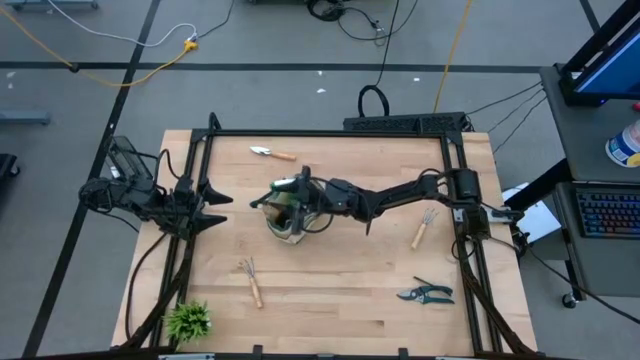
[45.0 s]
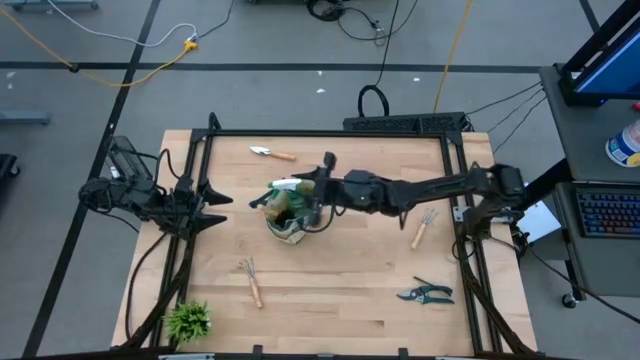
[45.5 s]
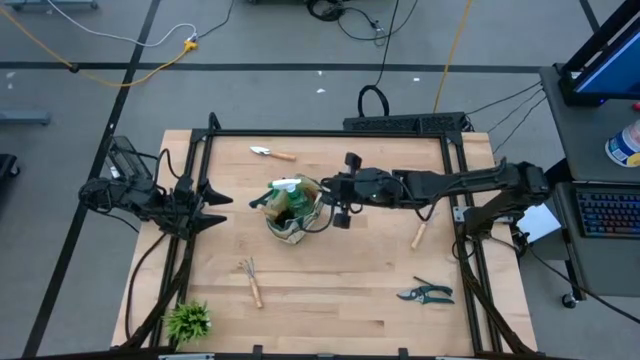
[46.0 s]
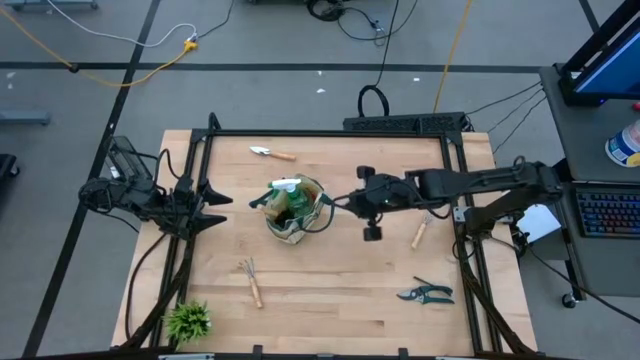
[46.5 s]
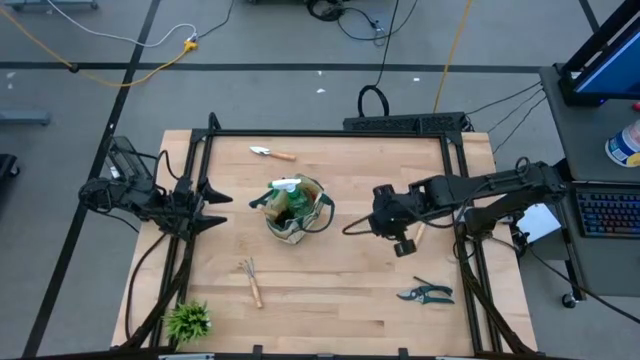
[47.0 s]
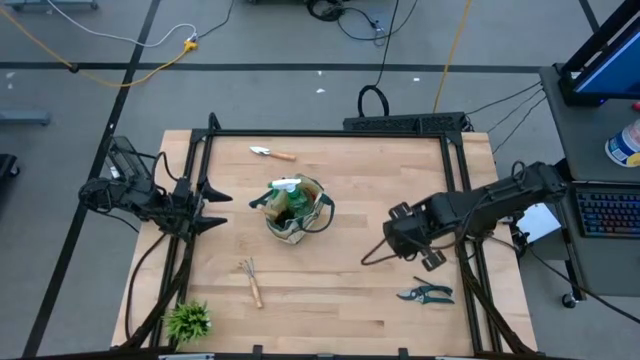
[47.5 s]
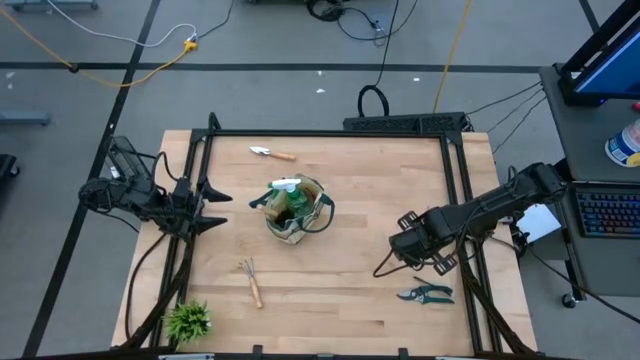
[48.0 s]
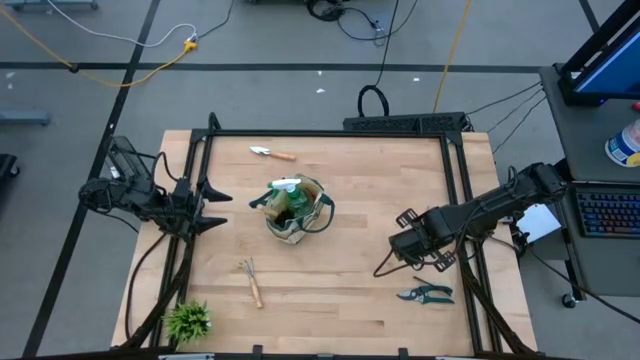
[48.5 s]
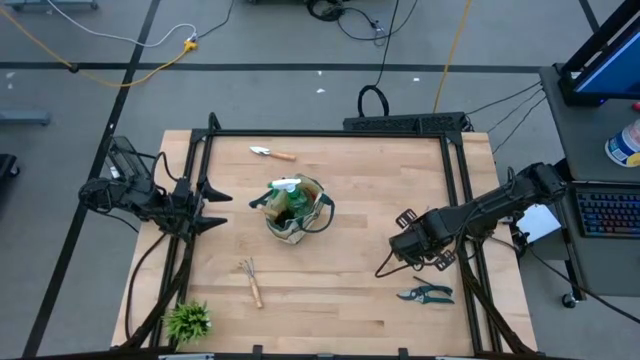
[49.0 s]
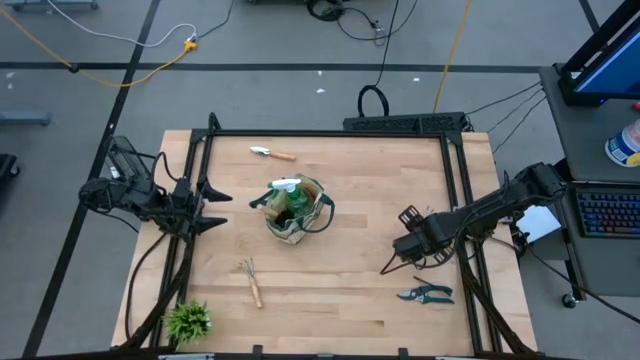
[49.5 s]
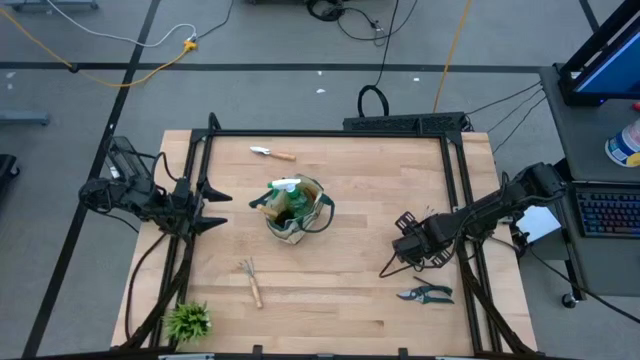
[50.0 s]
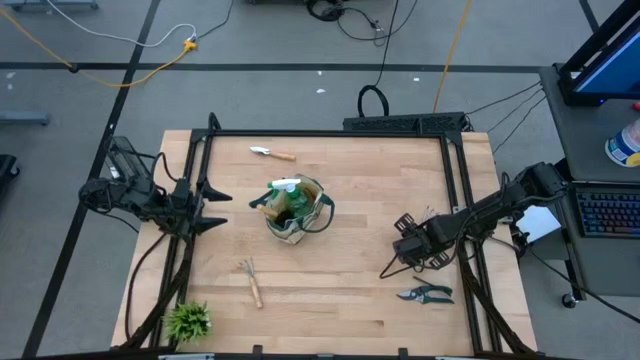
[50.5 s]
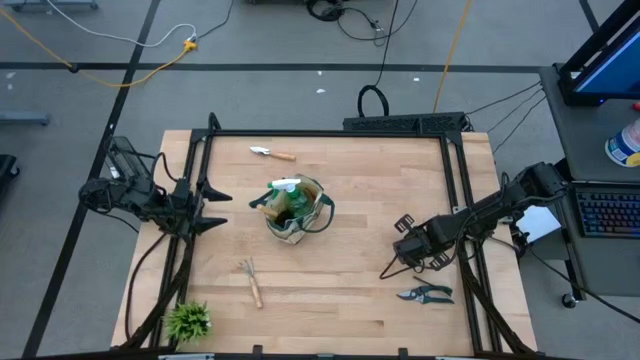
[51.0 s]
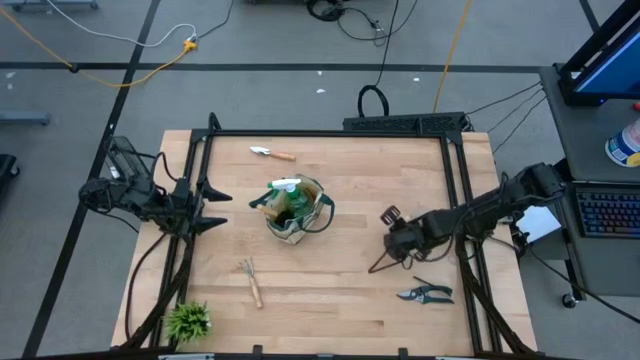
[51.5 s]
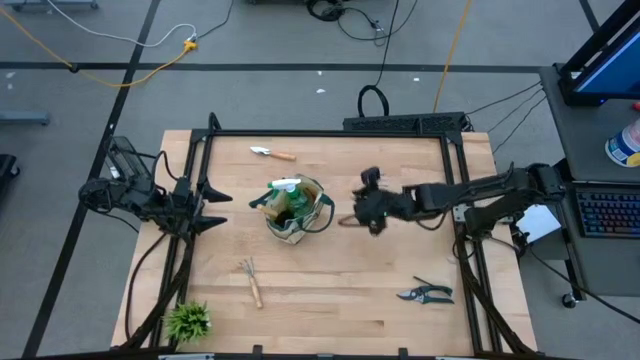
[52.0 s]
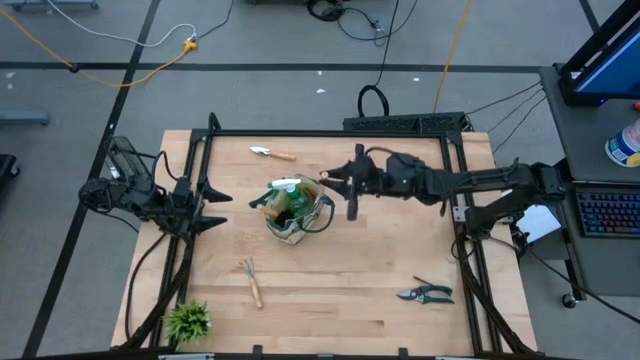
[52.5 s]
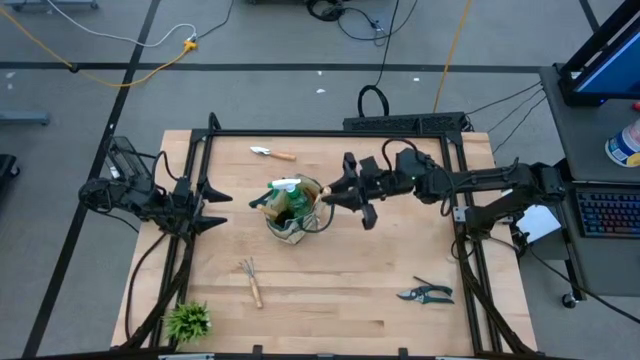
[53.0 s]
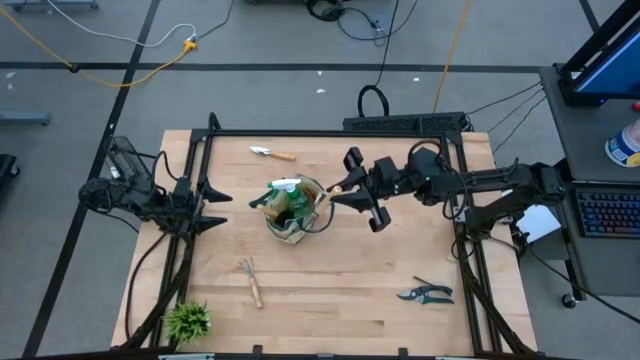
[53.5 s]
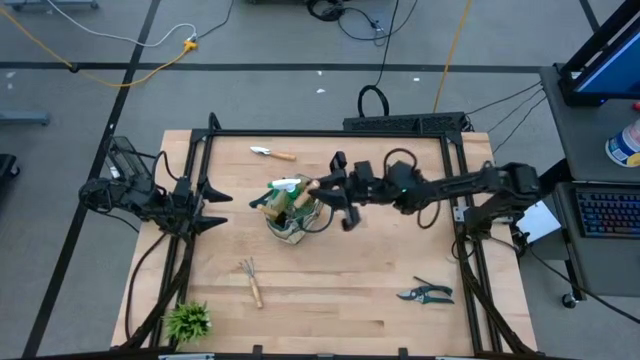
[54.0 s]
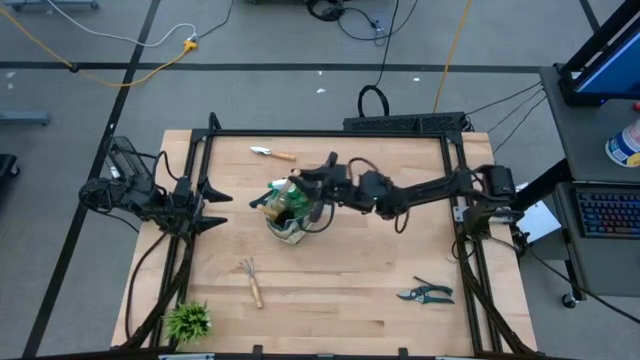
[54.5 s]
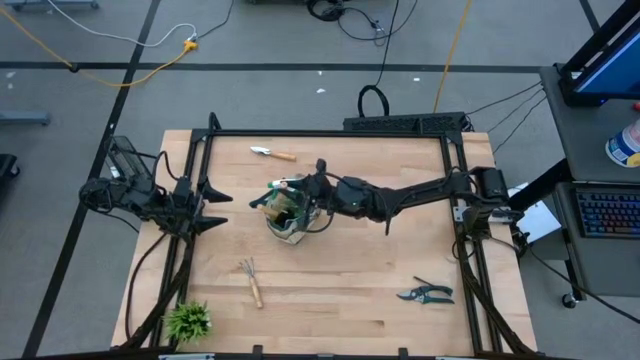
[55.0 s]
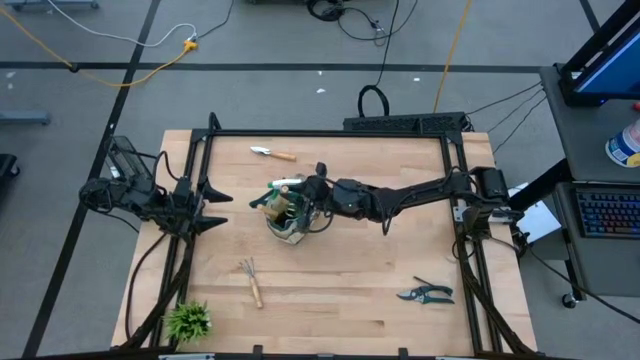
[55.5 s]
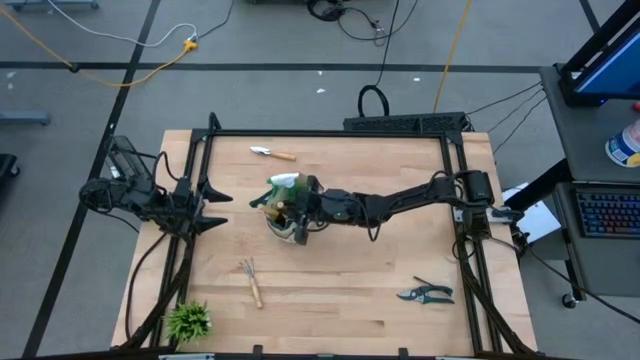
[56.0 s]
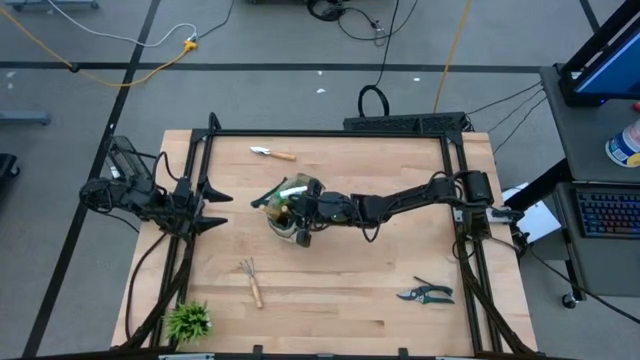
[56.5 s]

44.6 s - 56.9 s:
Task: Pick & Place Garden tools in Gardening bag
Put the brown right hand rake into the green gardening bag

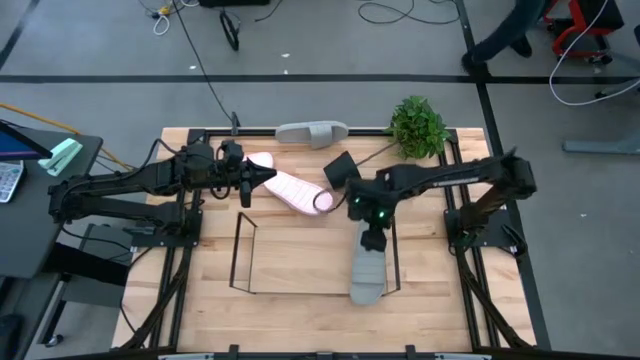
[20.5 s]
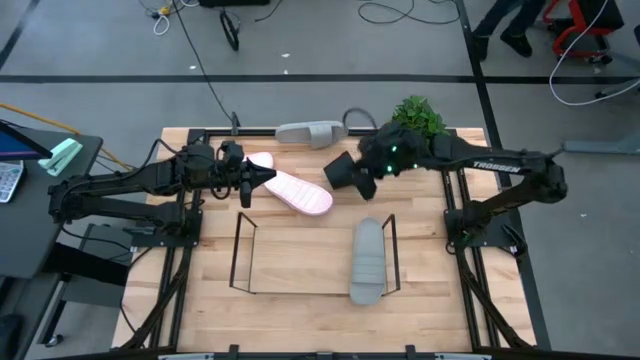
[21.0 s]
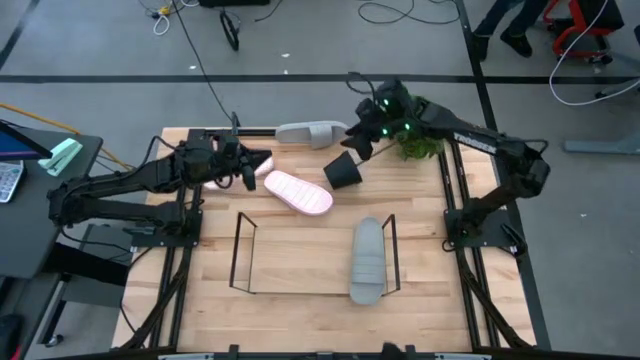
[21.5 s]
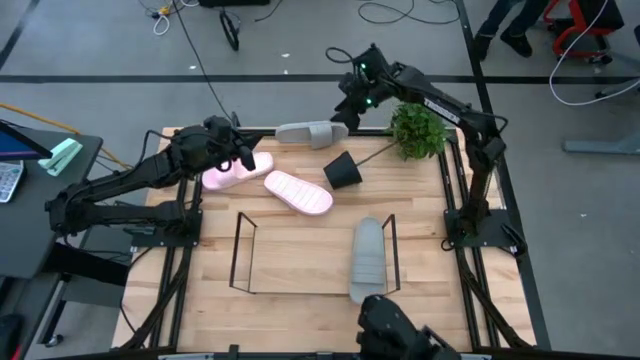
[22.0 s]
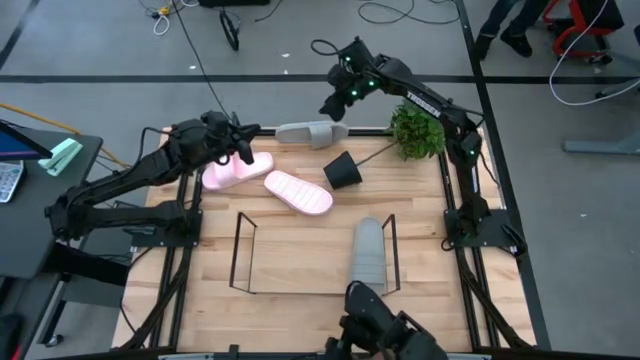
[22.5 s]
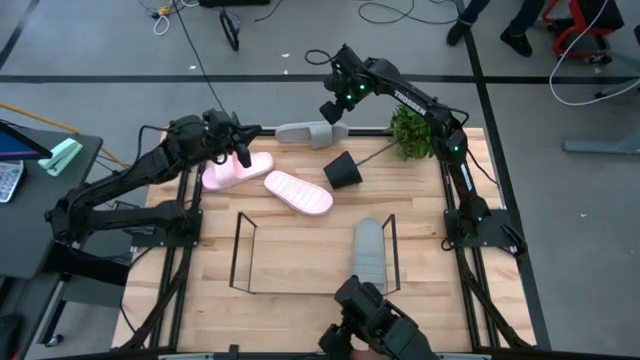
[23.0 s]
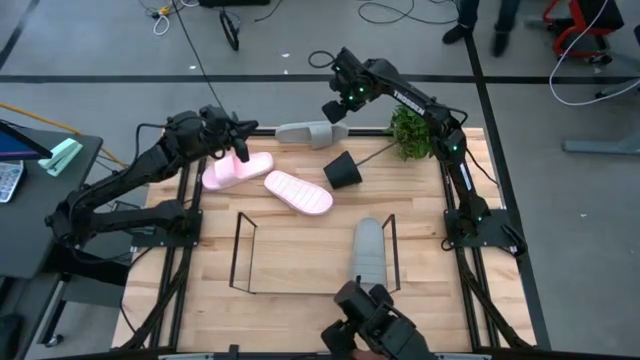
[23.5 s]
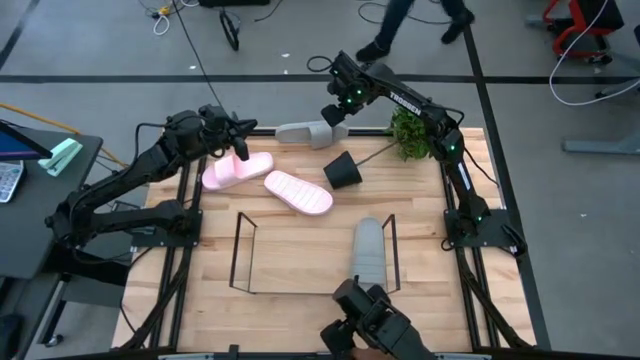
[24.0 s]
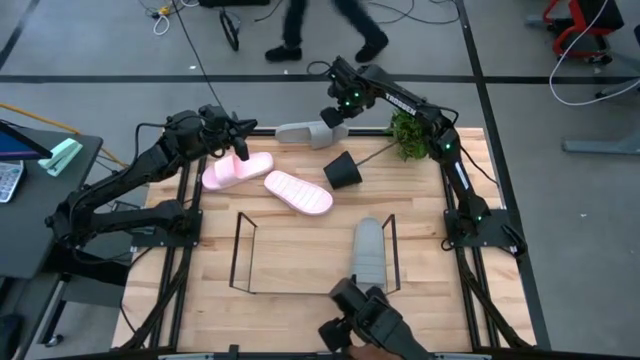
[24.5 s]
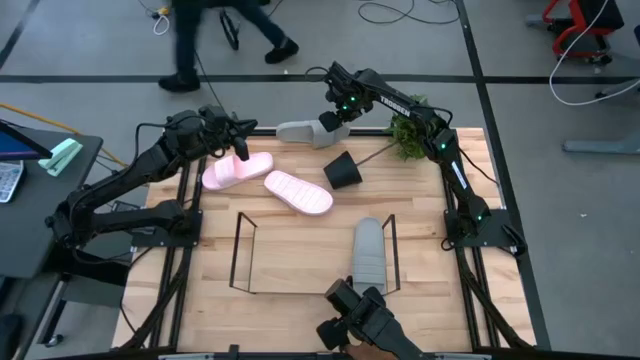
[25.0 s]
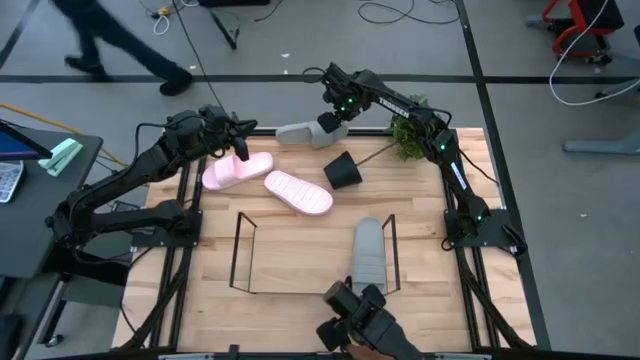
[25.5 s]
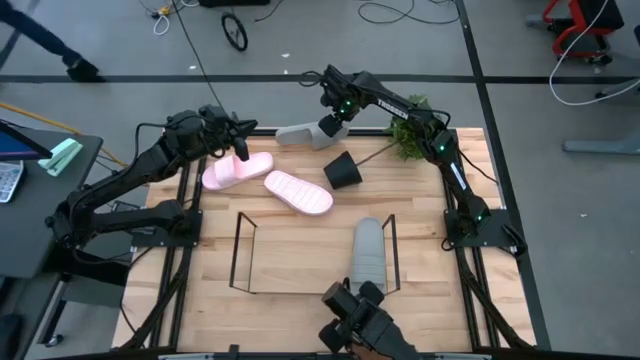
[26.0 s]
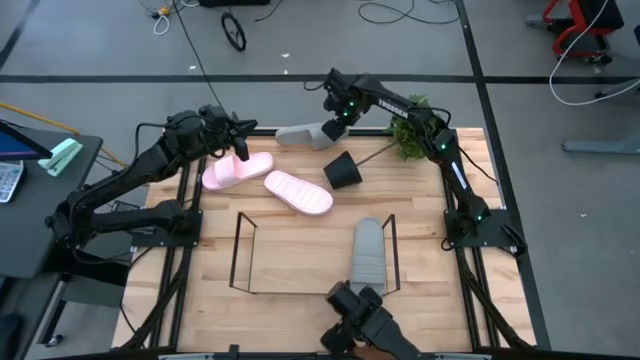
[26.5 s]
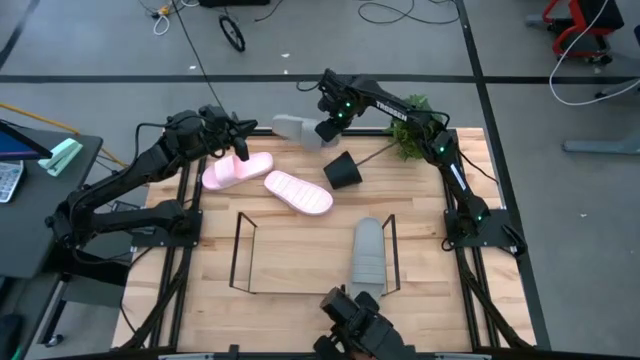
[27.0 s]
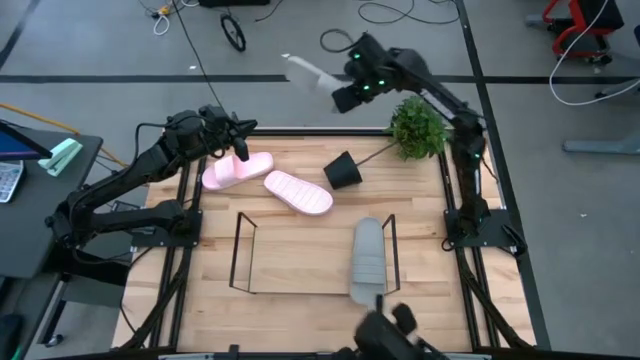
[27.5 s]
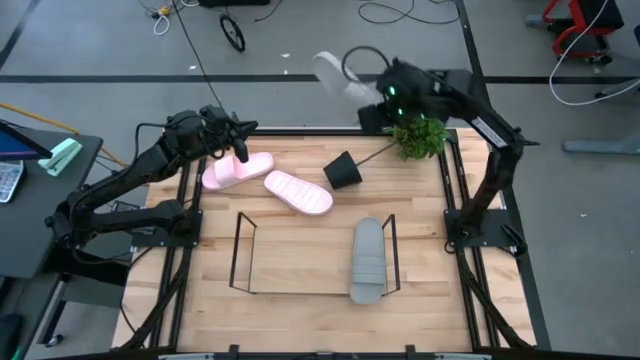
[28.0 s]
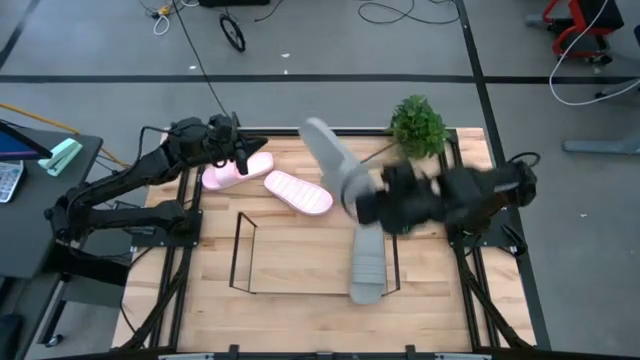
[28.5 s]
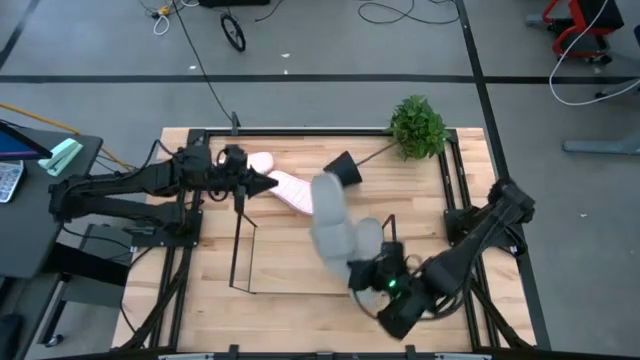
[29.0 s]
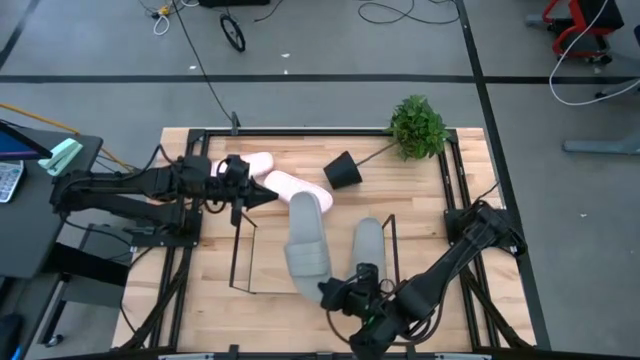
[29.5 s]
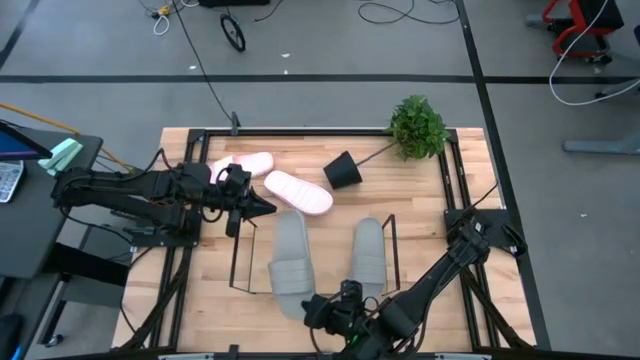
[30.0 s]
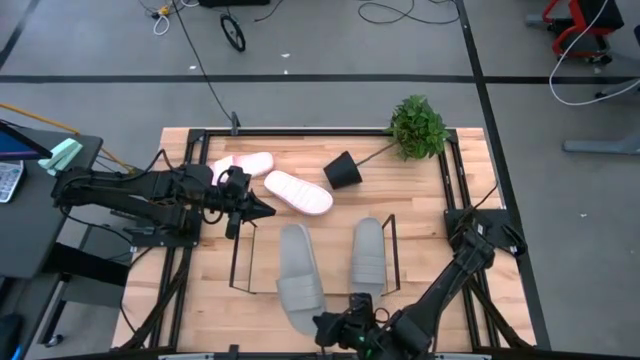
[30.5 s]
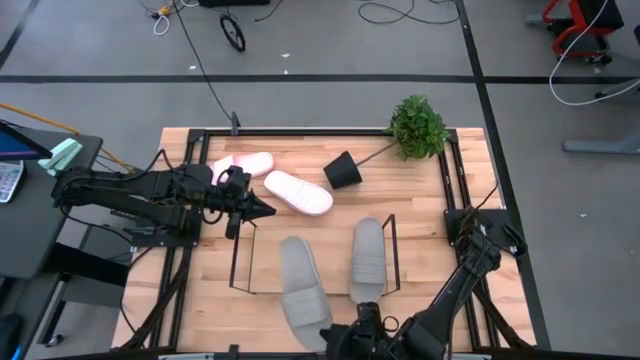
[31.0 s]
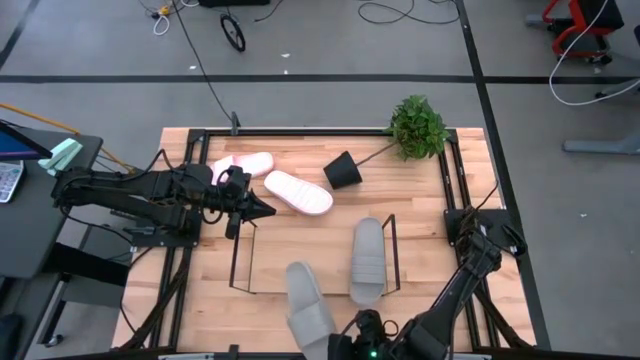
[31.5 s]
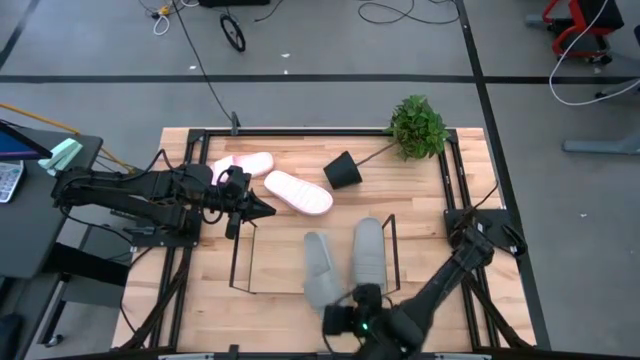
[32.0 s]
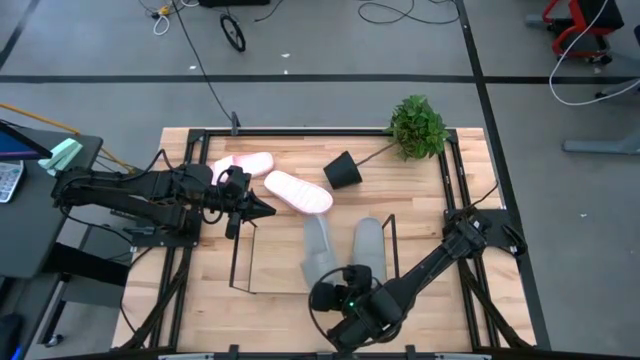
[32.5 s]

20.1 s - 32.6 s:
Task: Pick and place slides into the shelf
Align the gray slipper with the other gray slipper on the shelf
